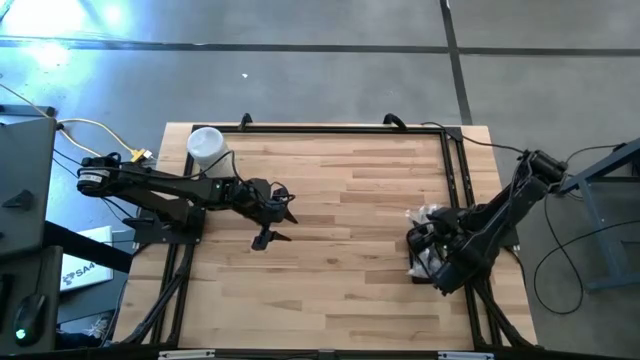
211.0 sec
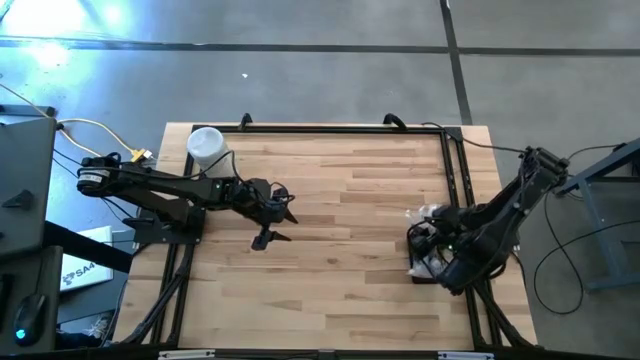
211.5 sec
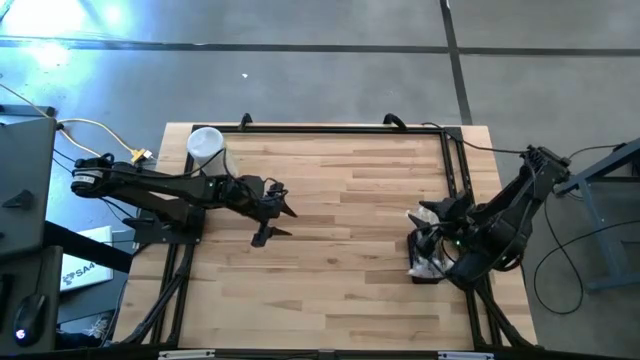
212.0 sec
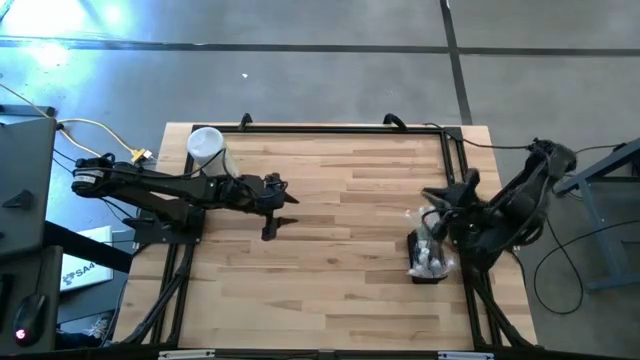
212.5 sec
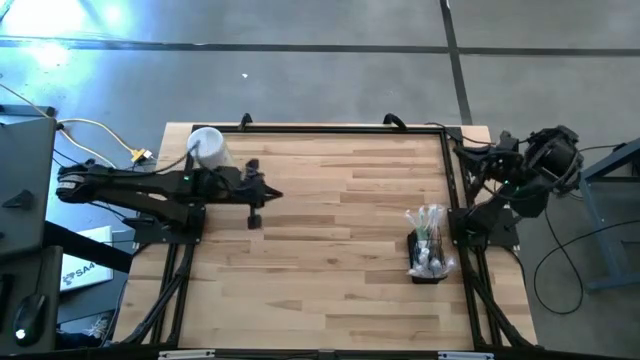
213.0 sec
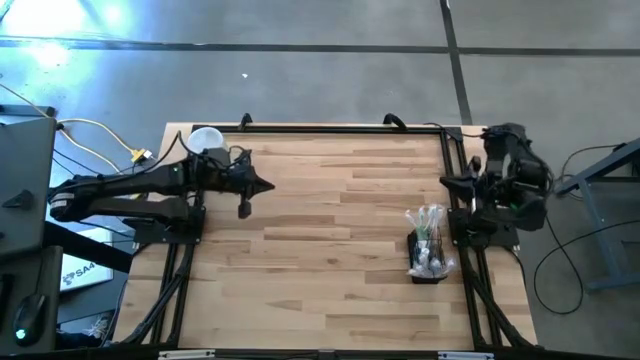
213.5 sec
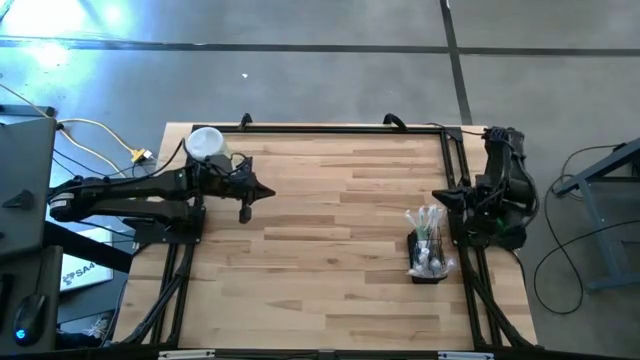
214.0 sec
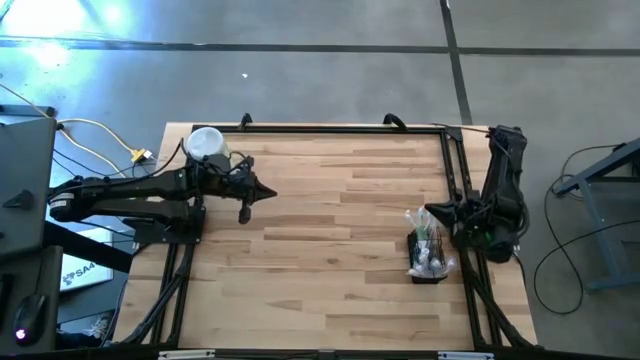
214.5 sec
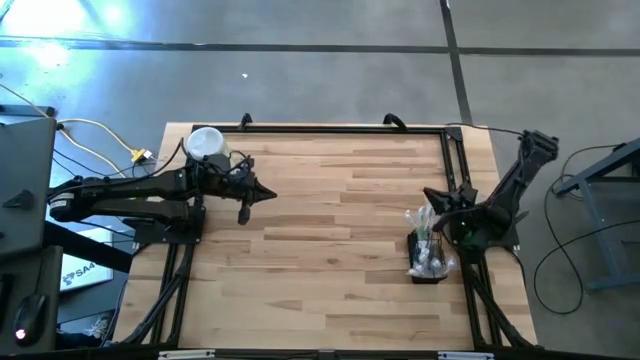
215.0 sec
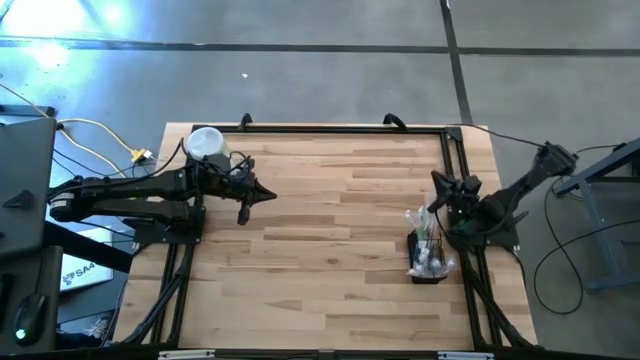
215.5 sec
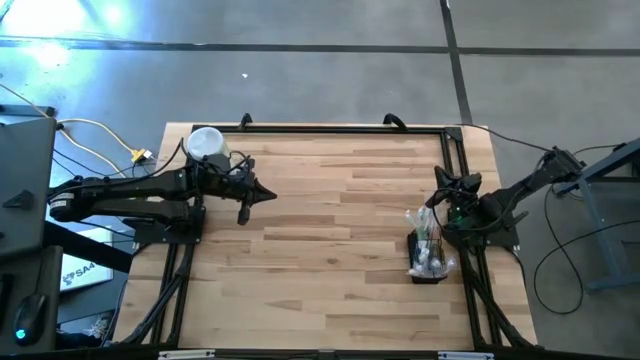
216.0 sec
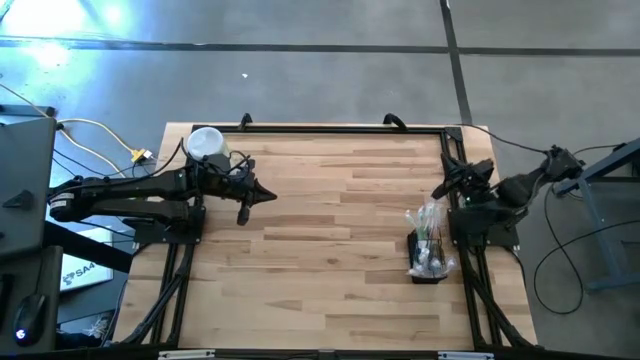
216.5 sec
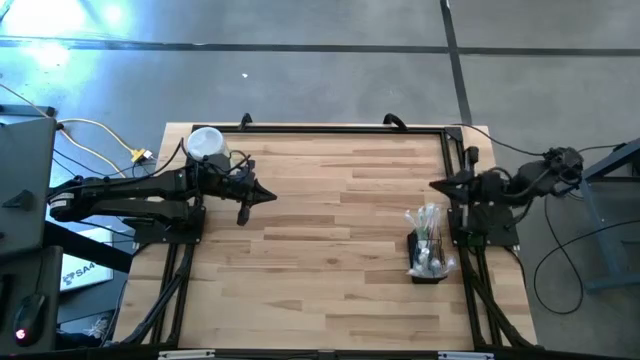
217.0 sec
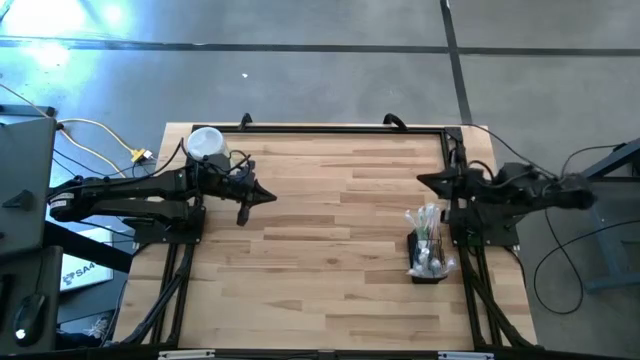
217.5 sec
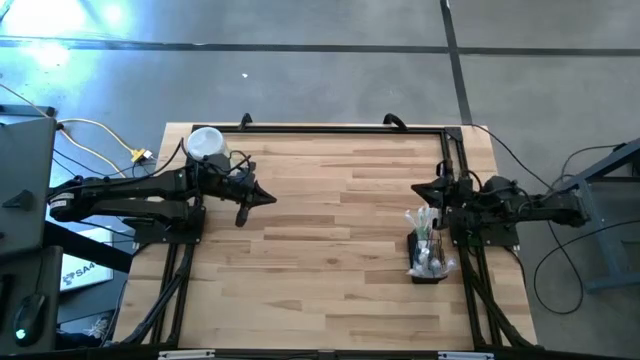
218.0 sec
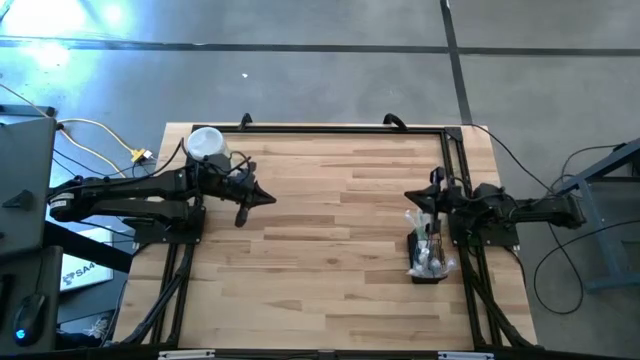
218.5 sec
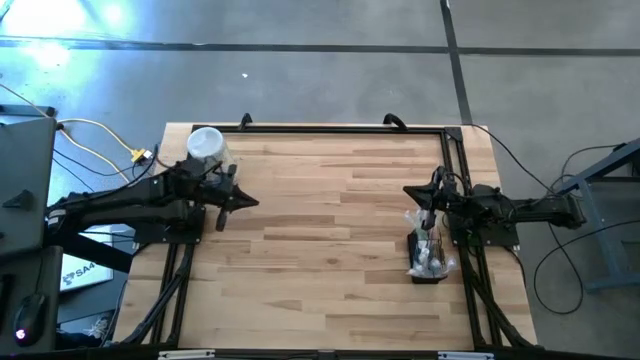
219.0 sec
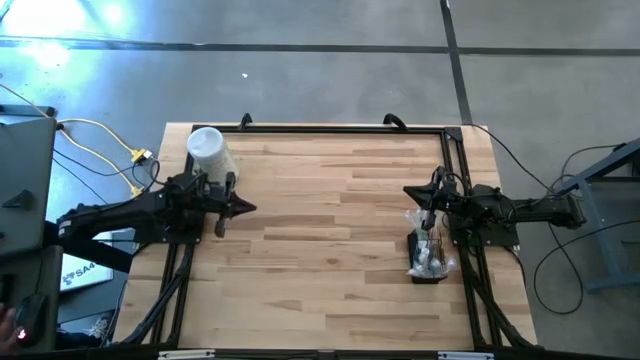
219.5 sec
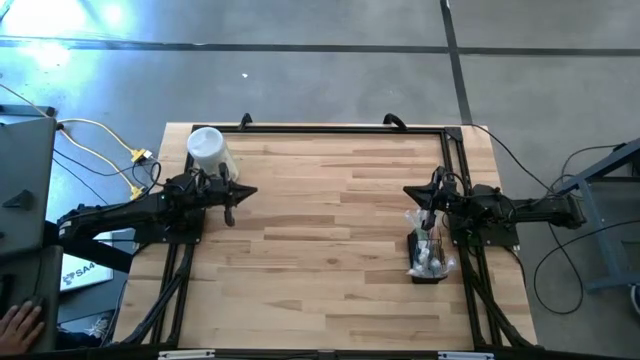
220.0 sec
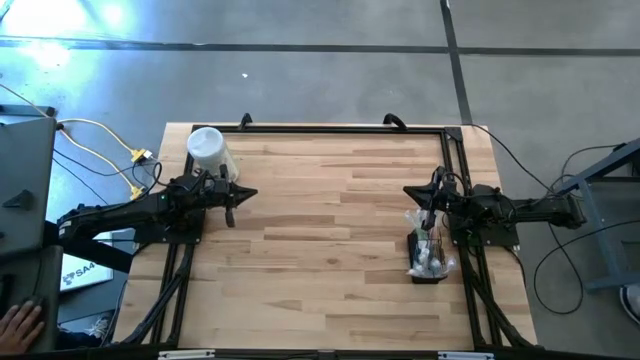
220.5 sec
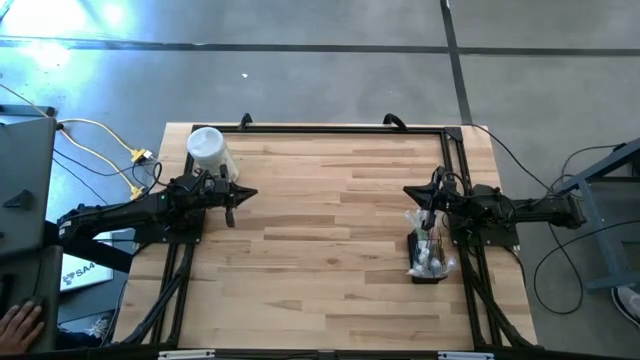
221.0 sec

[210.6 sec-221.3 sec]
Task: Pick & Place toothbrushing station
Return to Home Position

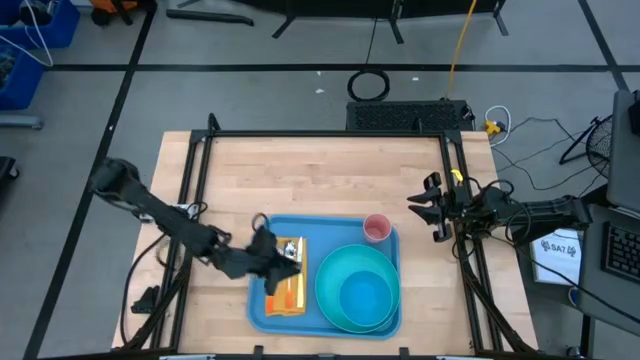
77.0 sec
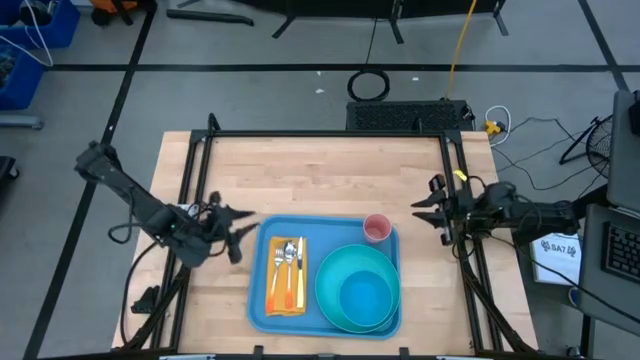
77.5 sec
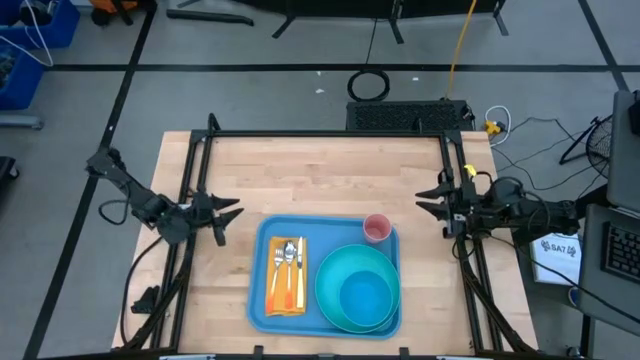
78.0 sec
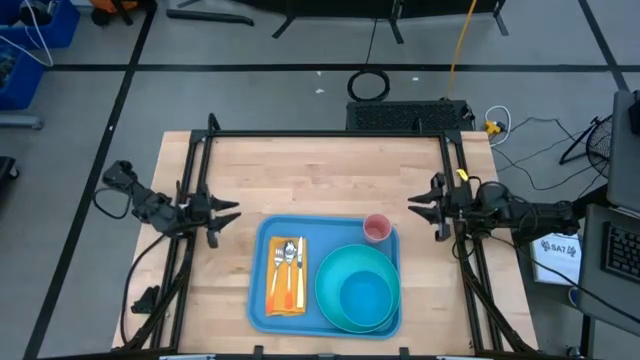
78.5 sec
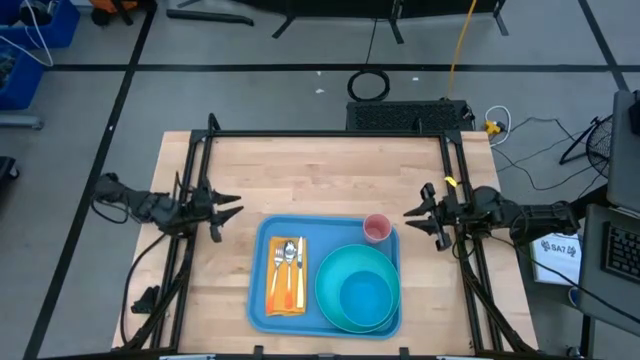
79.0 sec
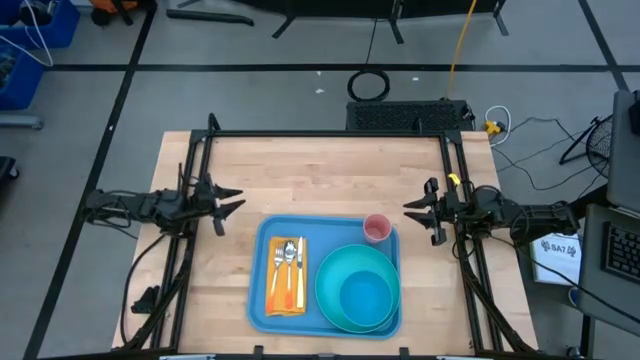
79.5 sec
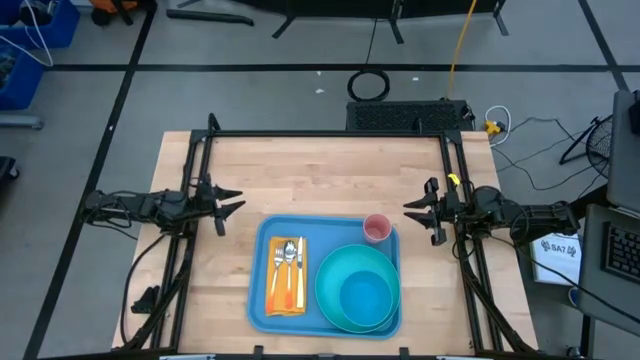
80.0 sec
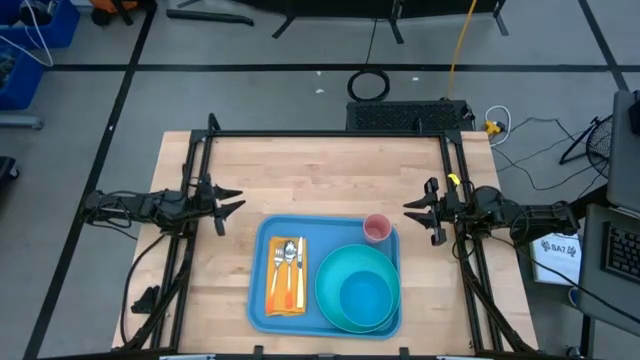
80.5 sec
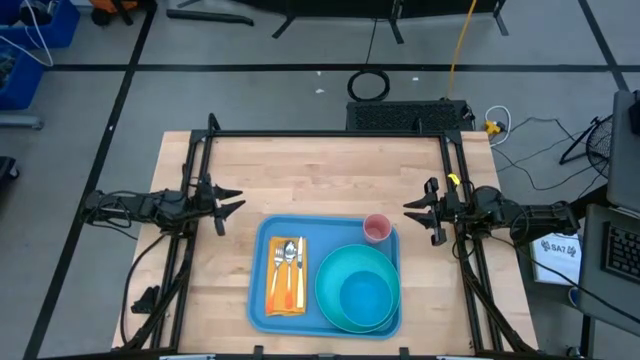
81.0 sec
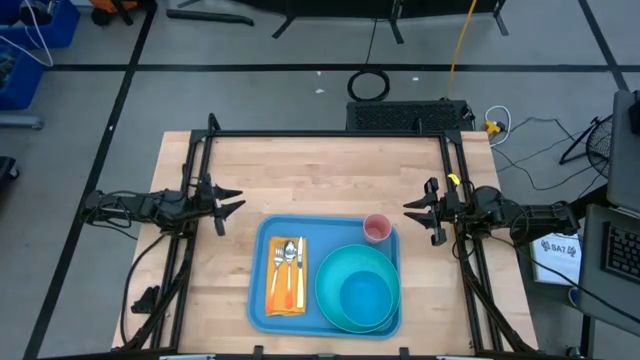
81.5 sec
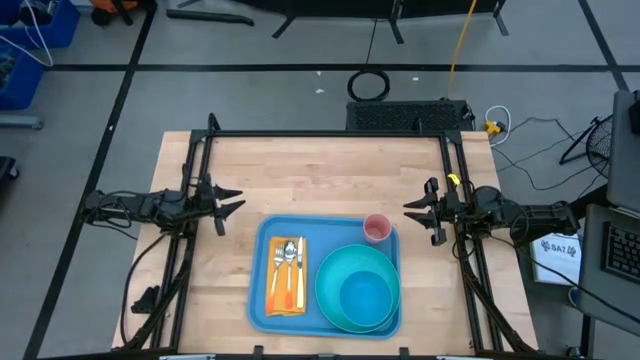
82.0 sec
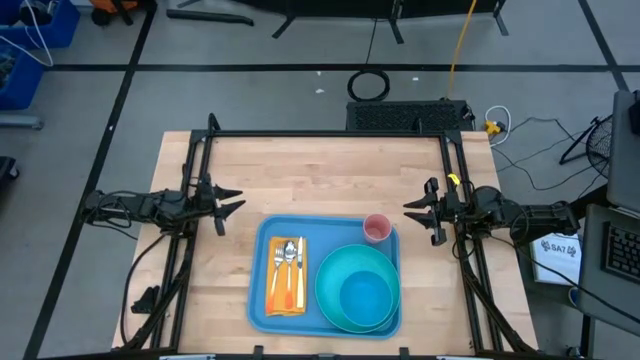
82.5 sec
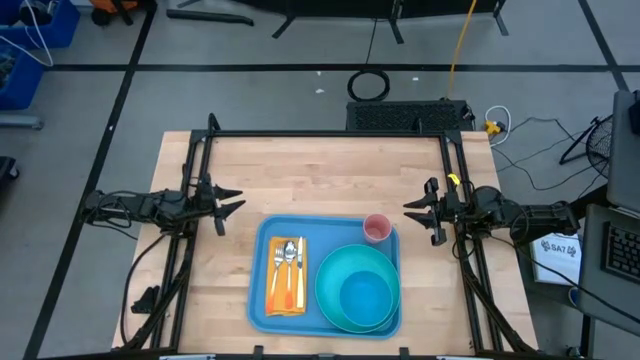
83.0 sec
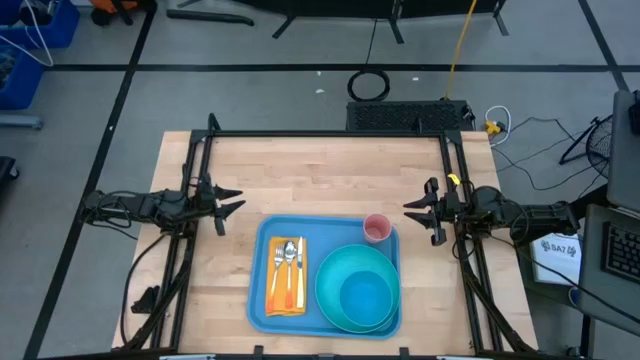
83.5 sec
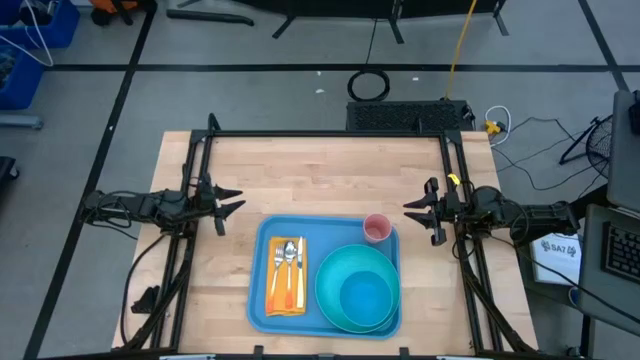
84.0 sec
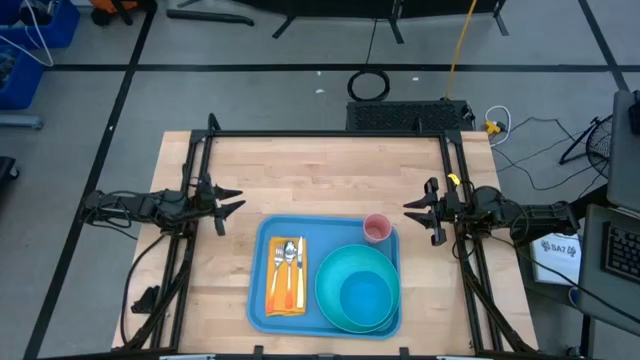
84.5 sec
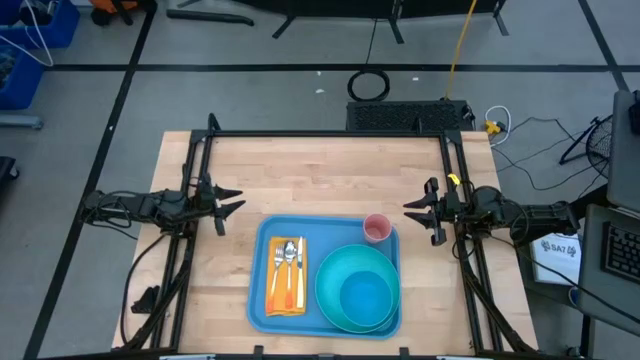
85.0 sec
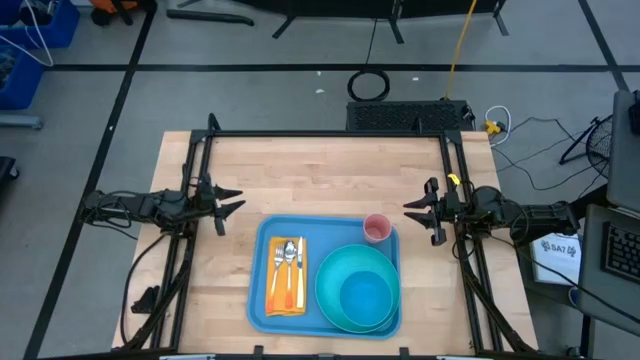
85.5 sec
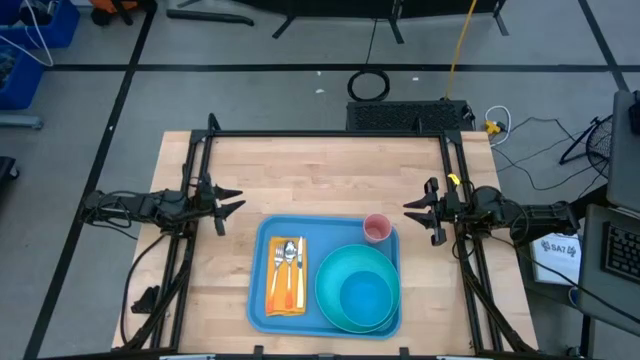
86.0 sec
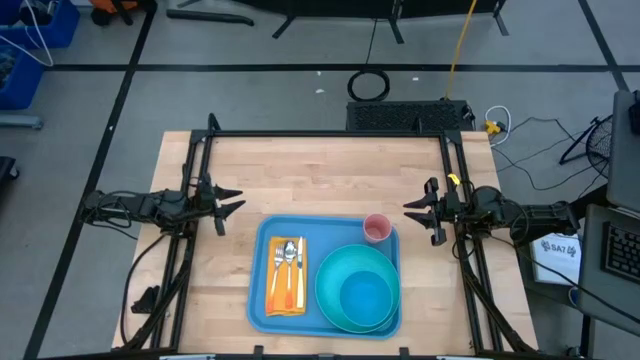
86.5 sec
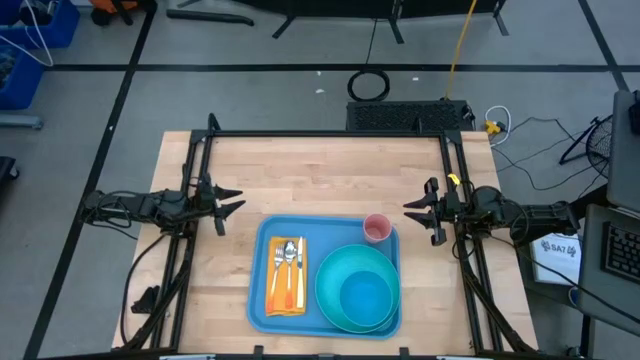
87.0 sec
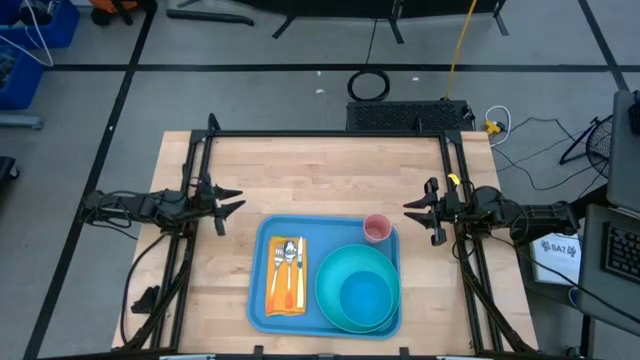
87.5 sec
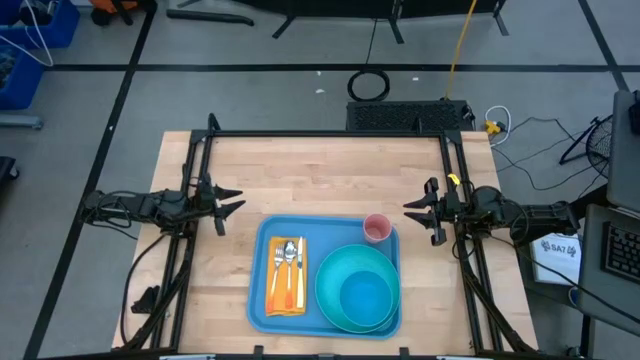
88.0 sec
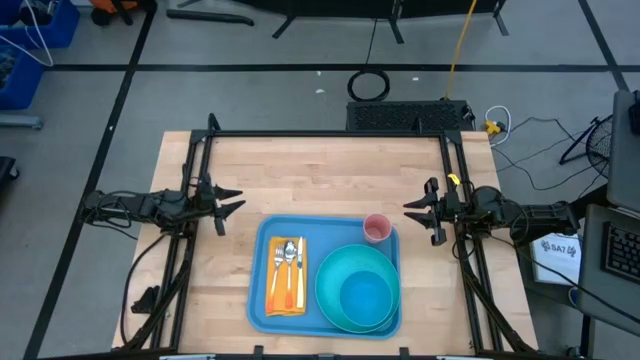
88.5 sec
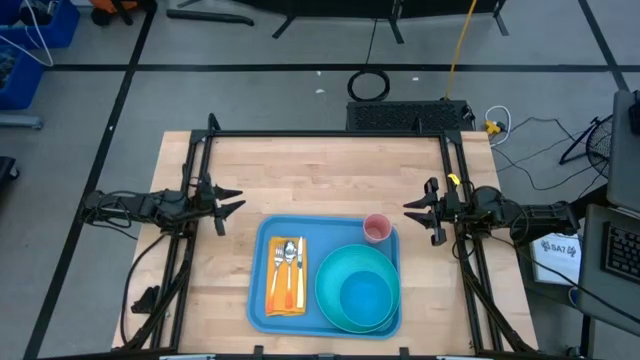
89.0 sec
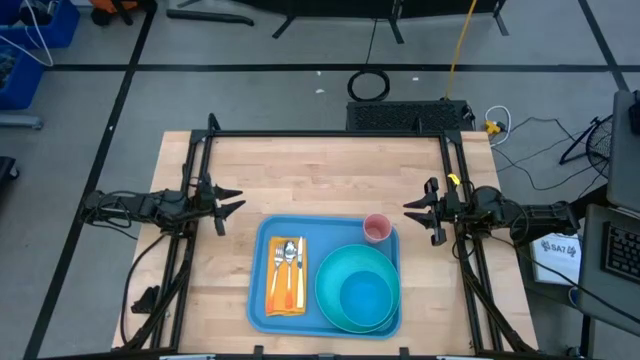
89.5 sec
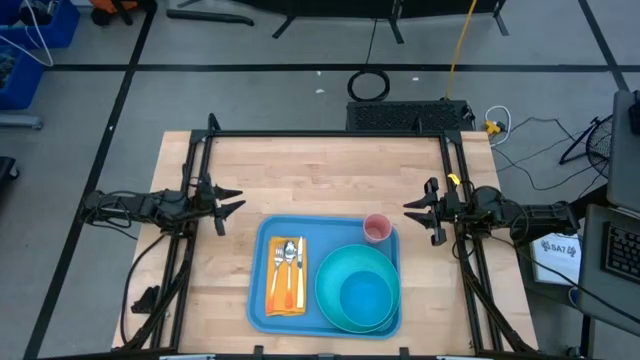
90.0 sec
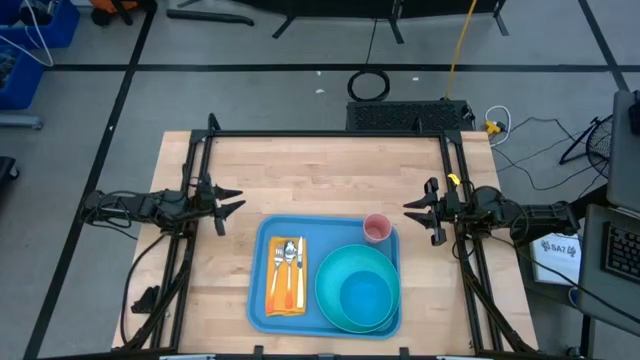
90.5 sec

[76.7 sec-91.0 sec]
Task: Set up tray
Return to Home Position
